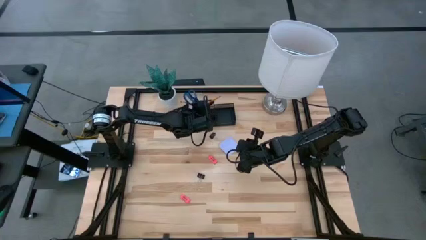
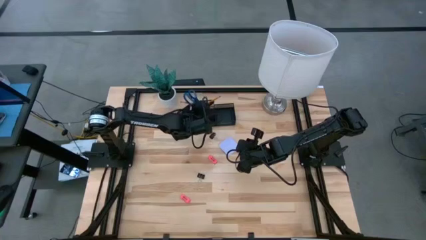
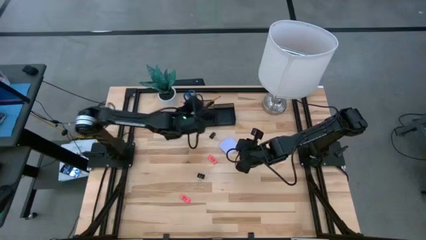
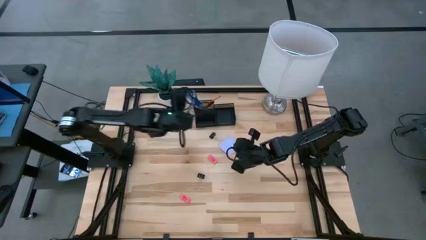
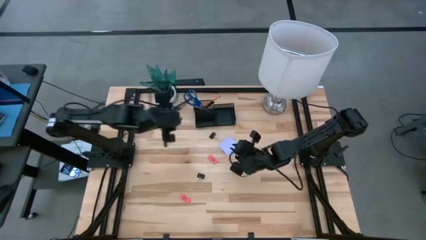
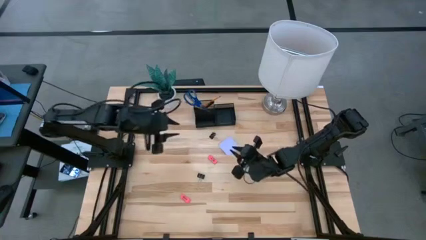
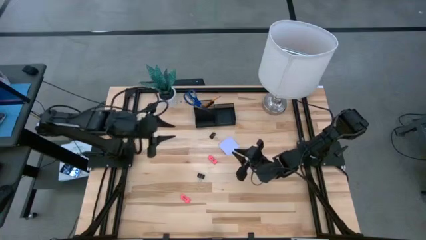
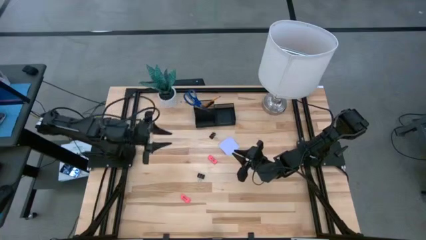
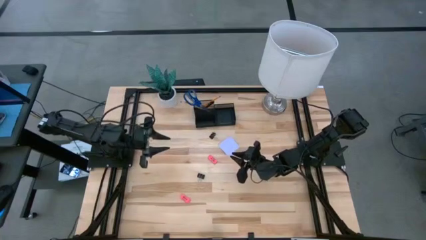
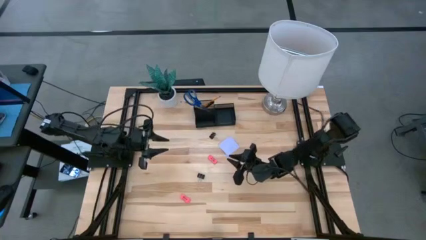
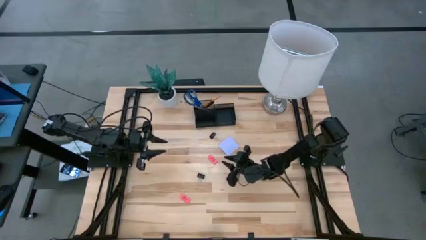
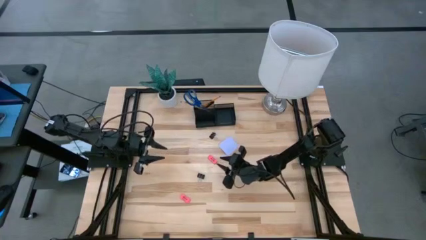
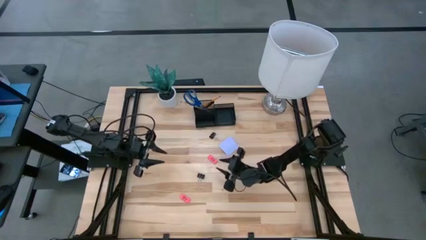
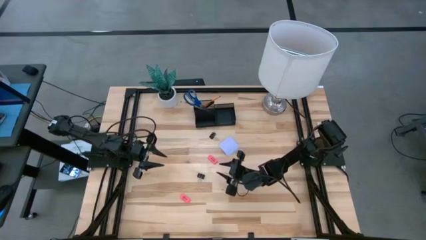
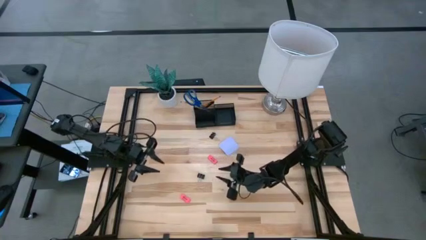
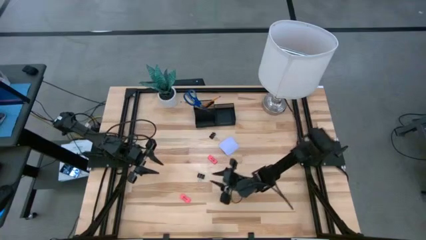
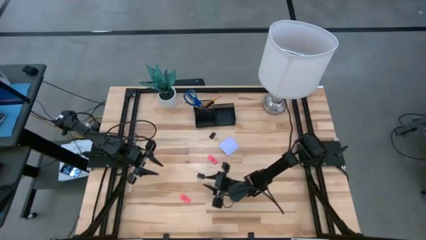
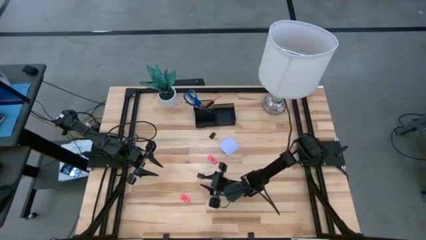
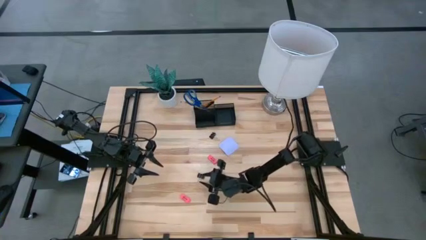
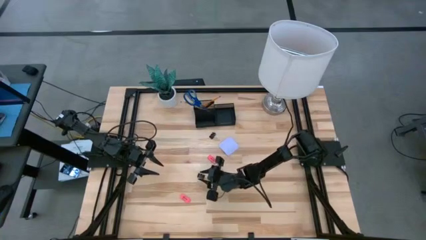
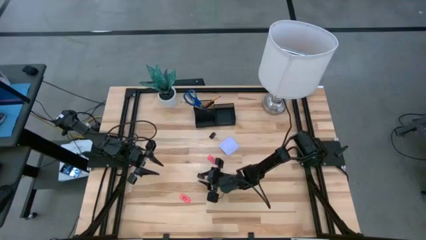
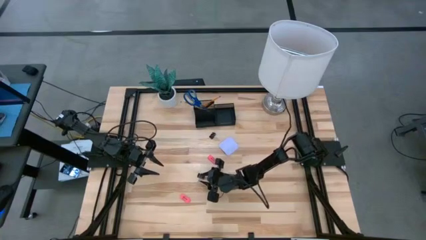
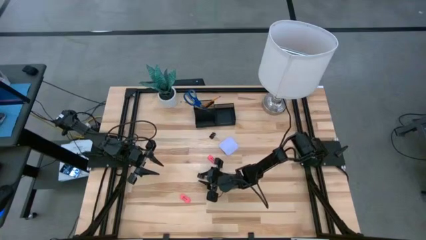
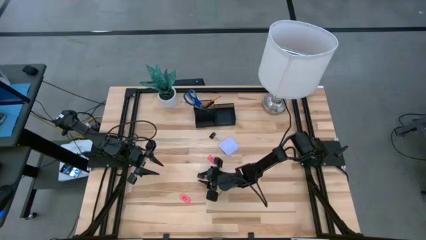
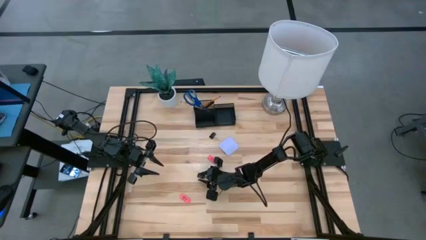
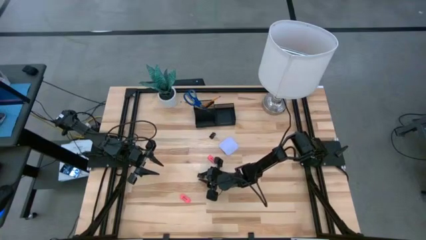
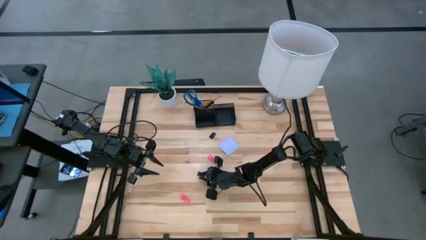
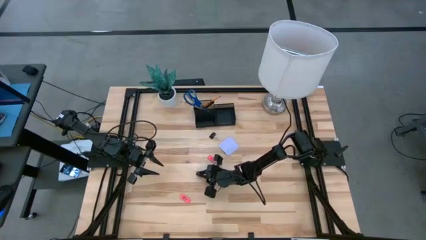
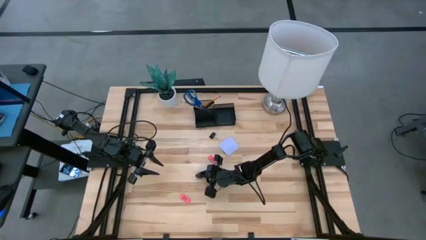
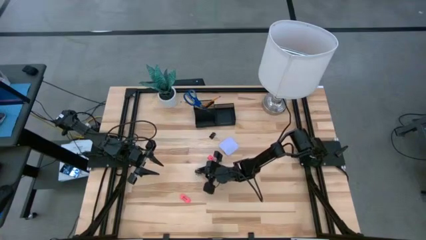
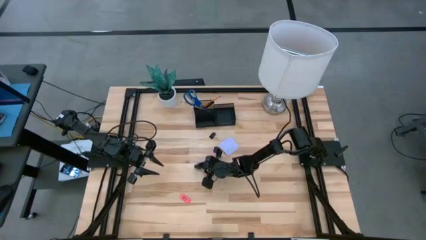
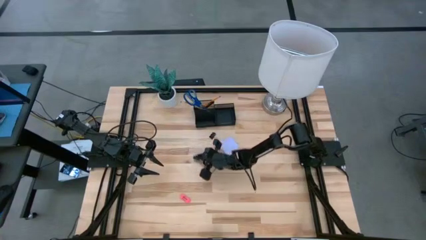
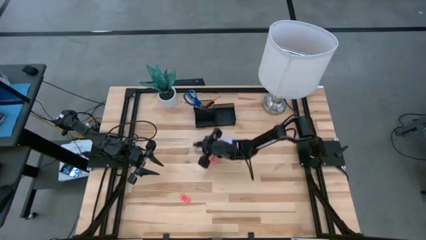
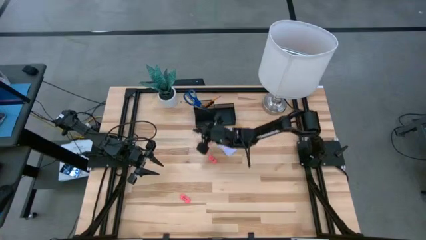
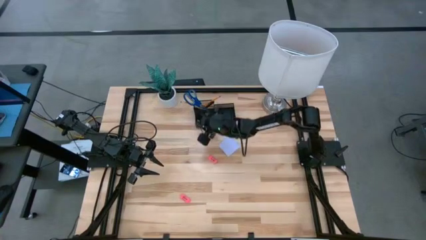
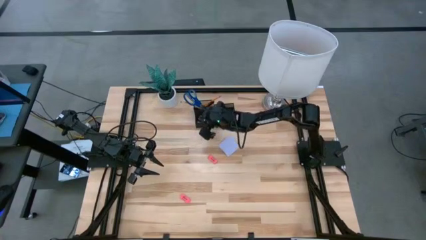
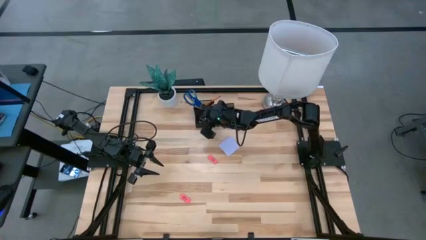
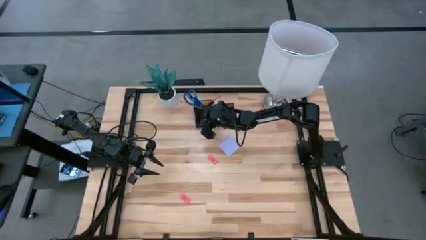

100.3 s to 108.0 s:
Task: Pick and place office supplies into organizer
Put the bottom black binder clip into the black desk organizer

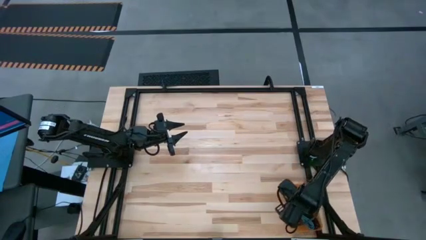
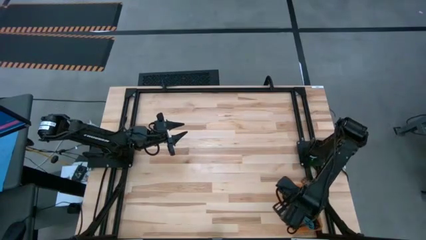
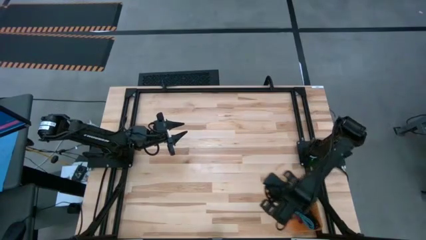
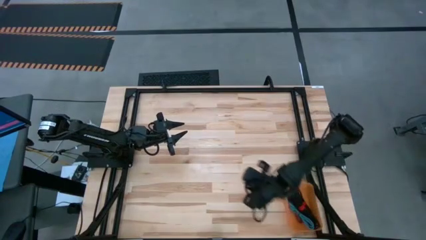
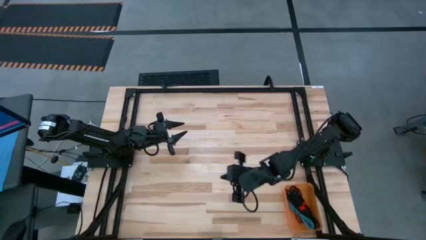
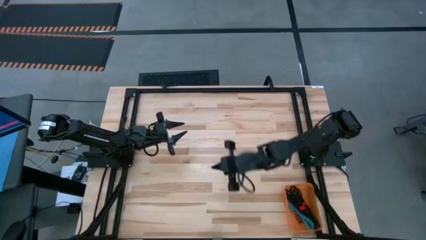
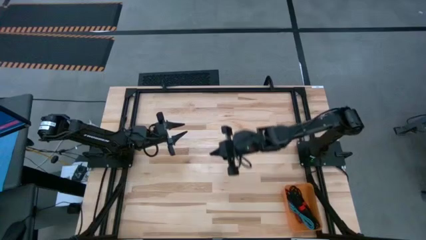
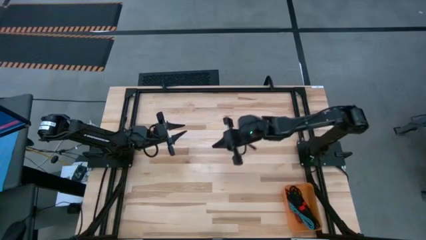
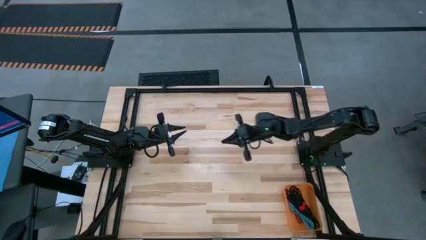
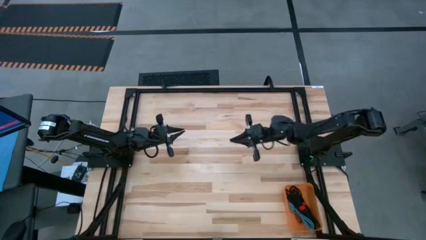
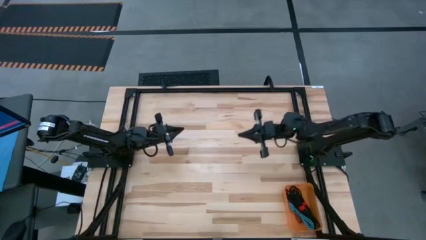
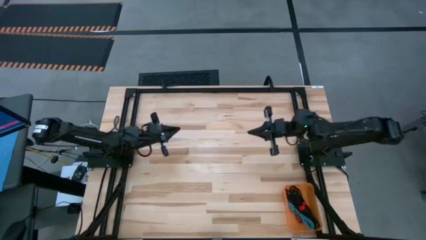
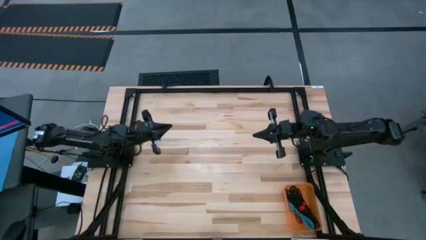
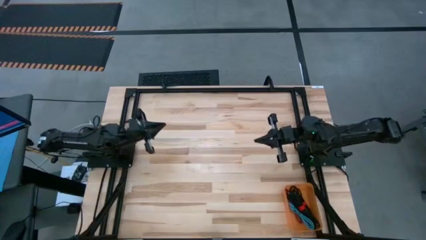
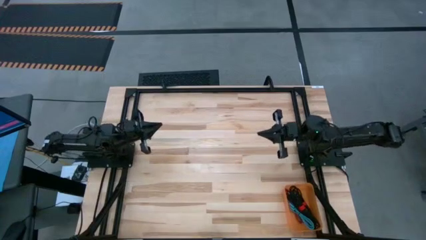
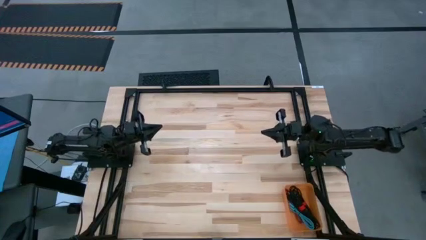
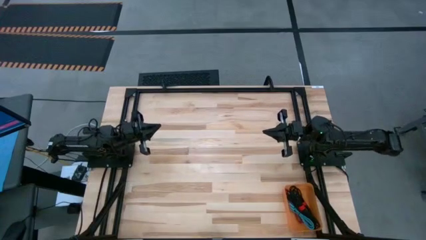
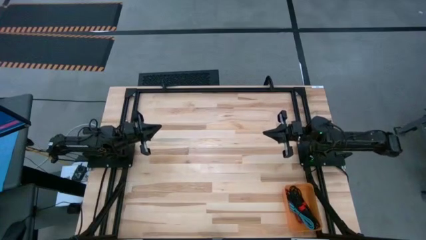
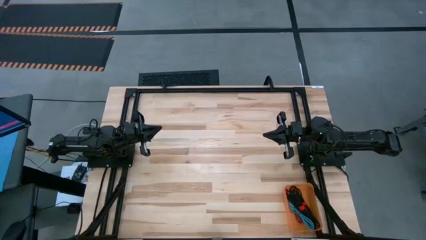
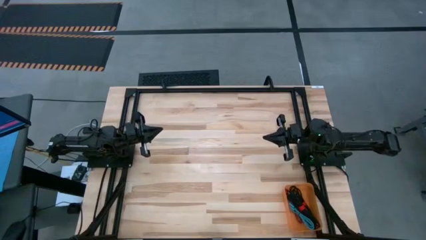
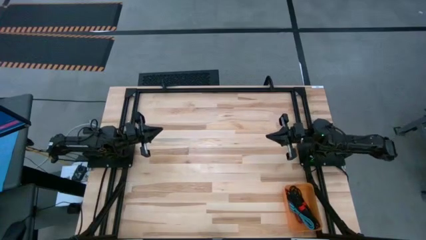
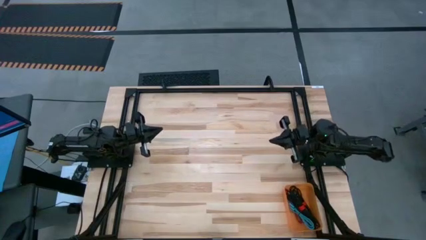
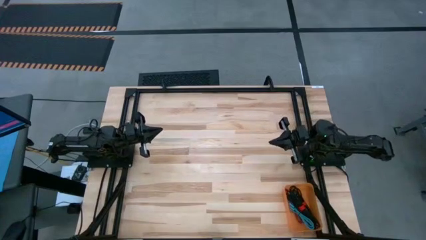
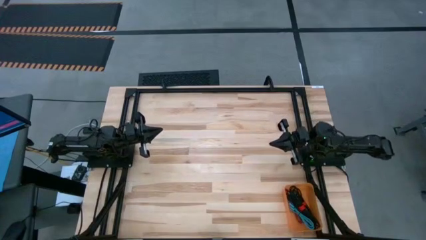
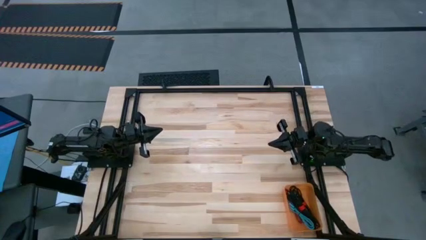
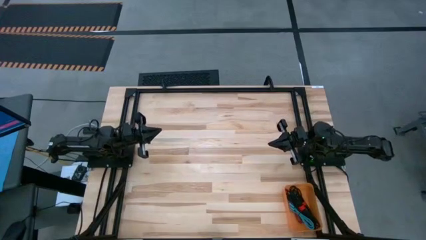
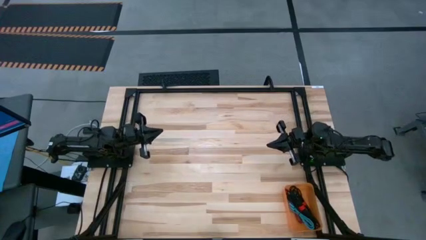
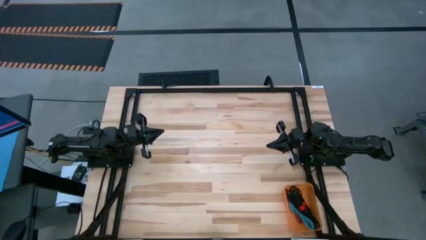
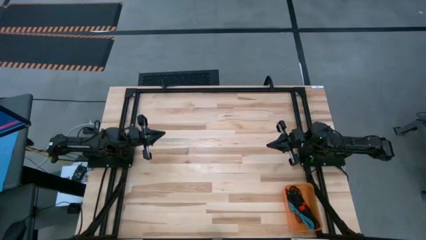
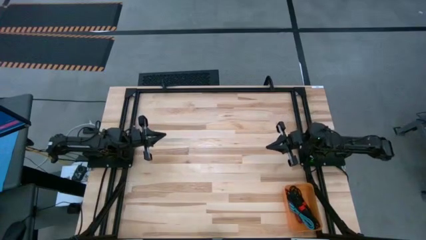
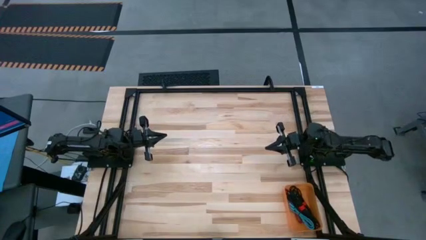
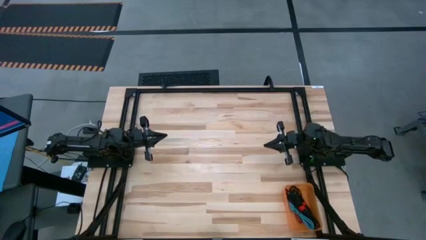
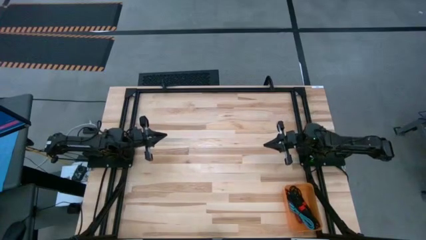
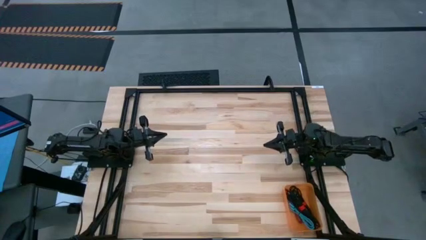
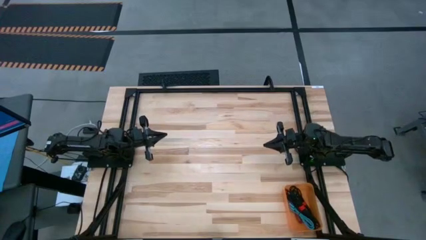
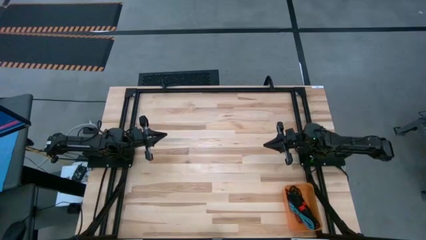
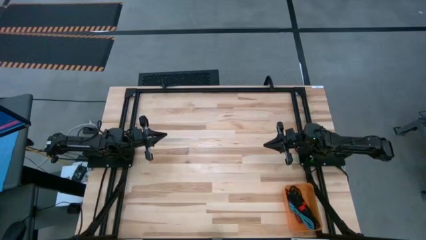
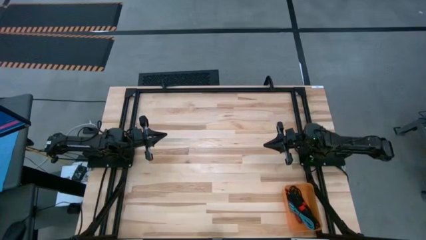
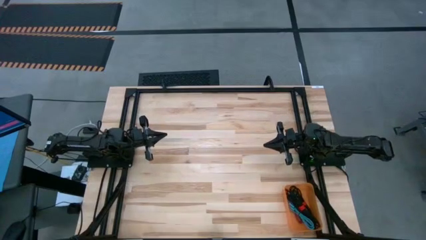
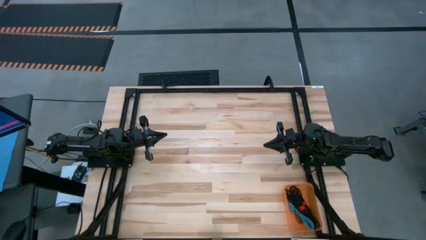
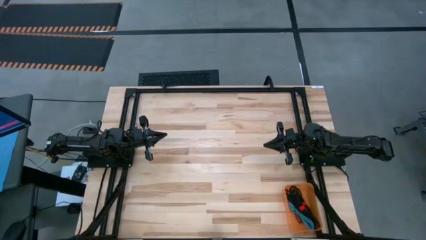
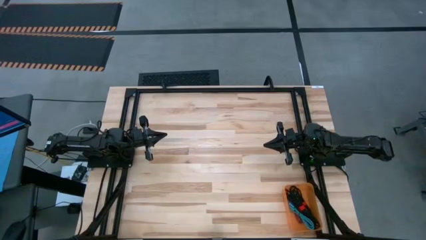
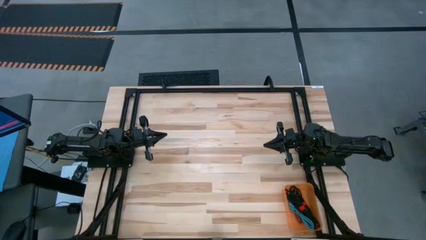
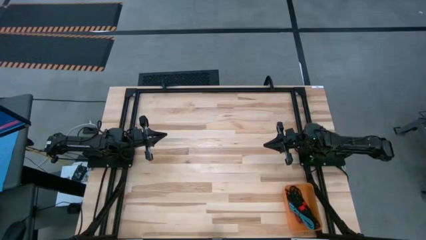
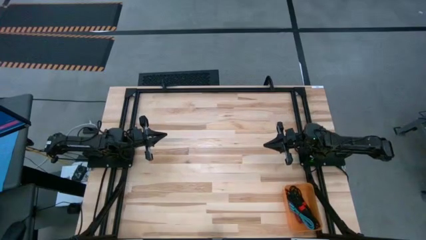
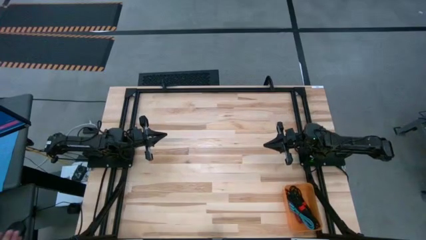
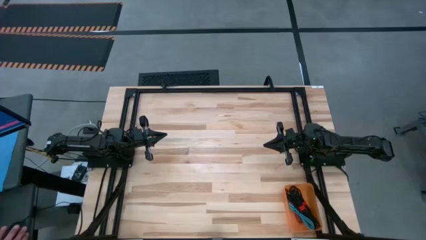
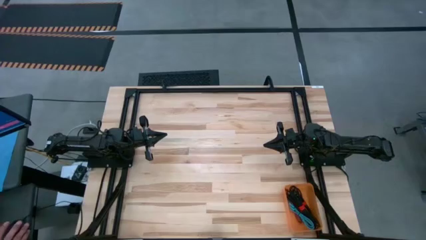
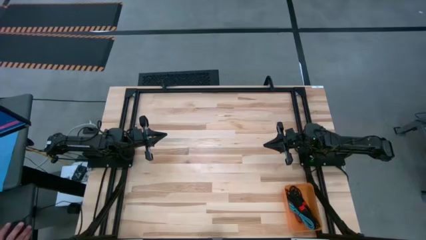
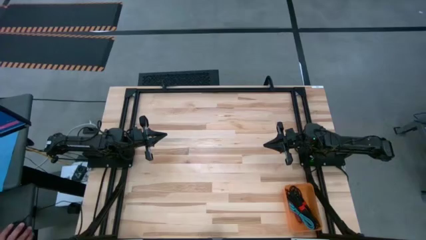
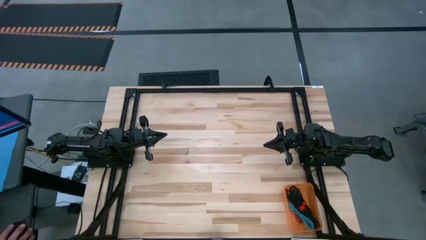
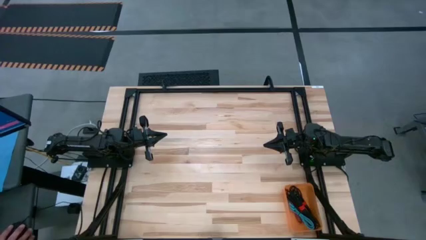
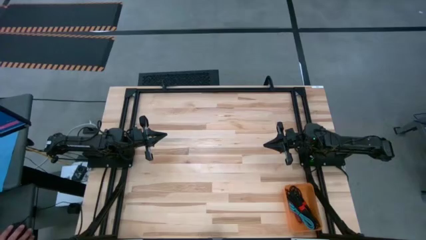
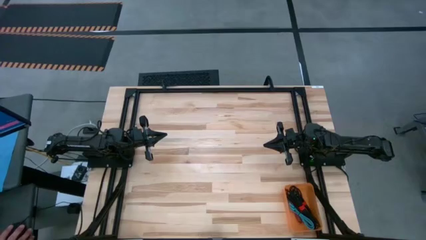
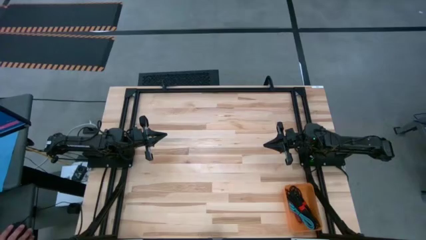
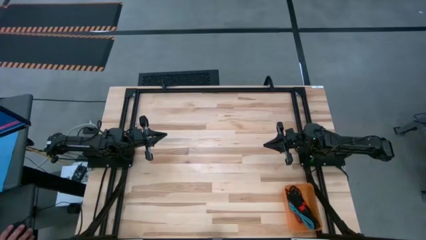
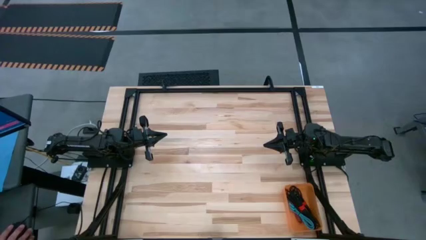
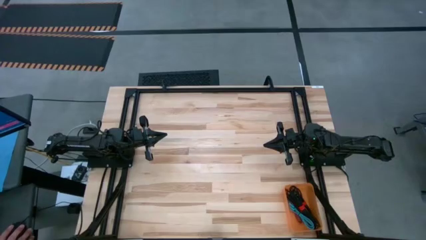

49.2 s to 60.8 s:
Task: Pick and place USB-C Cables
Return to Home Position
